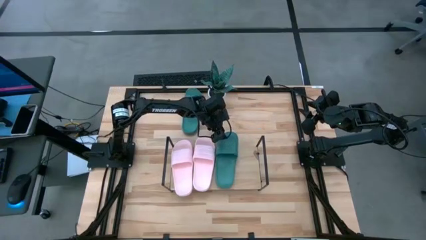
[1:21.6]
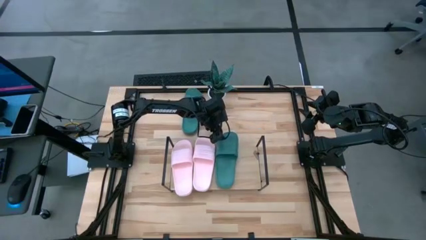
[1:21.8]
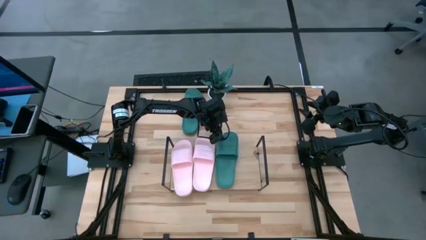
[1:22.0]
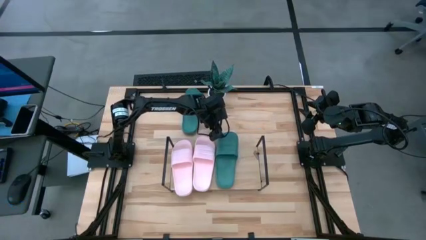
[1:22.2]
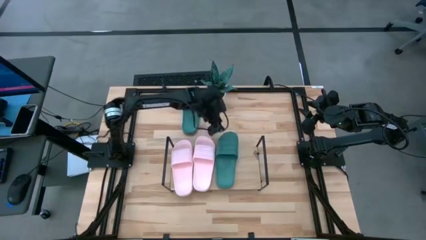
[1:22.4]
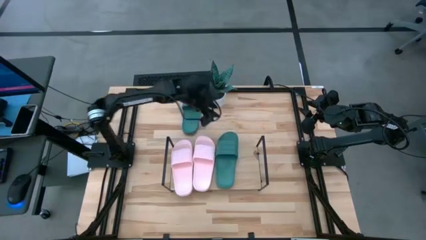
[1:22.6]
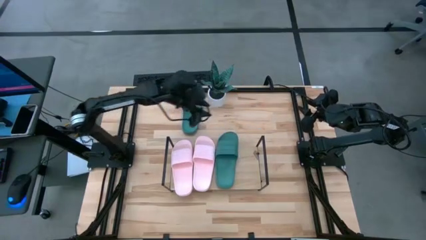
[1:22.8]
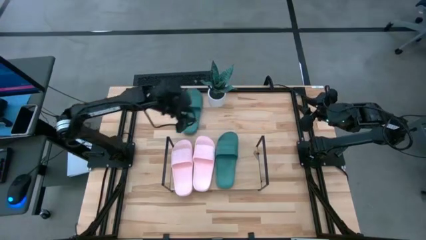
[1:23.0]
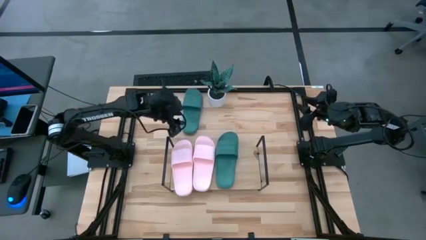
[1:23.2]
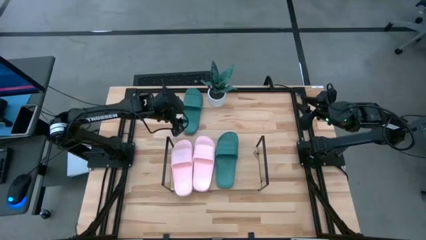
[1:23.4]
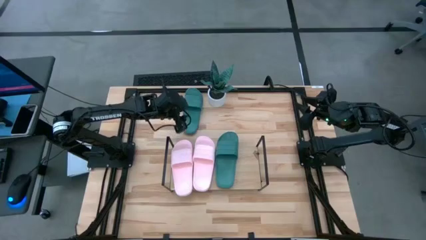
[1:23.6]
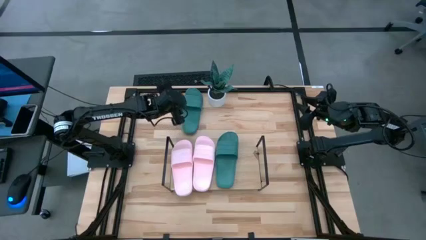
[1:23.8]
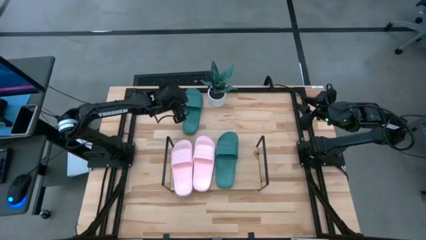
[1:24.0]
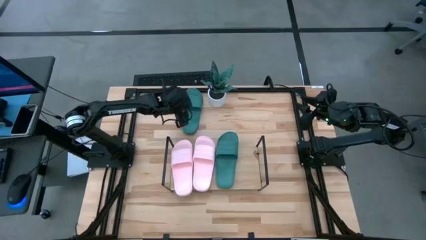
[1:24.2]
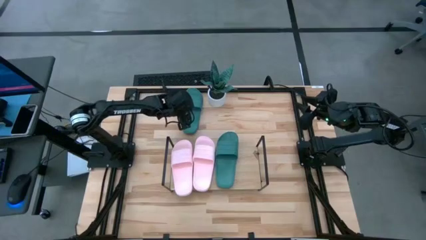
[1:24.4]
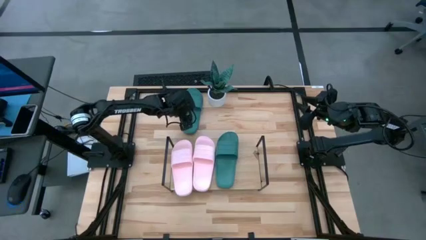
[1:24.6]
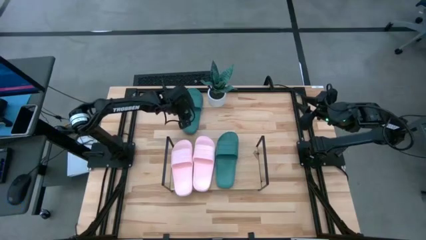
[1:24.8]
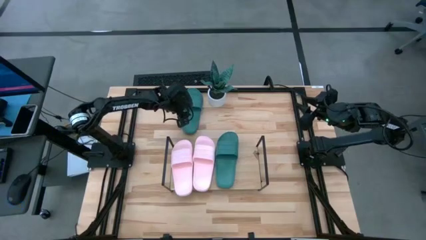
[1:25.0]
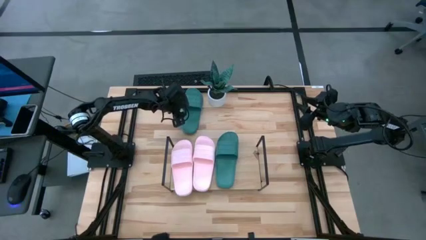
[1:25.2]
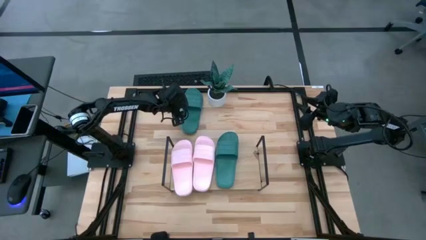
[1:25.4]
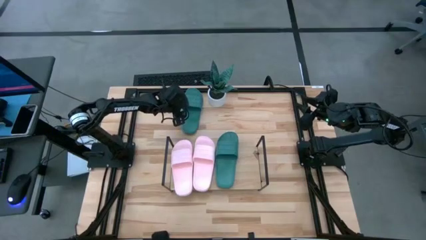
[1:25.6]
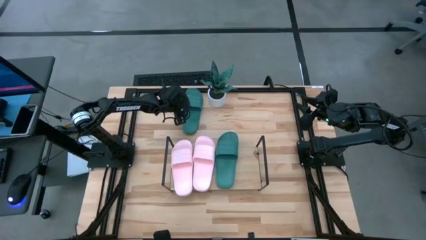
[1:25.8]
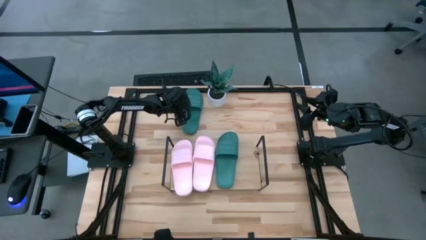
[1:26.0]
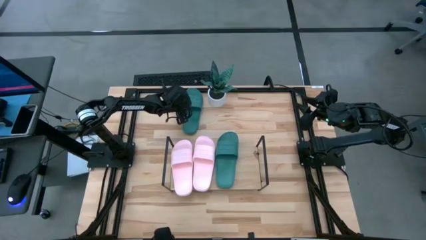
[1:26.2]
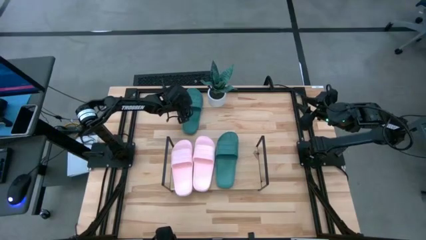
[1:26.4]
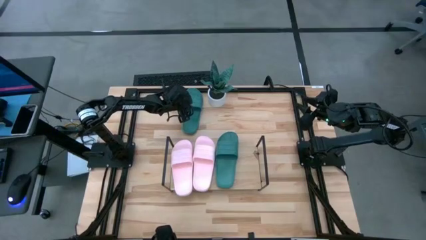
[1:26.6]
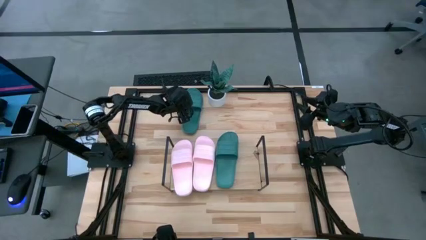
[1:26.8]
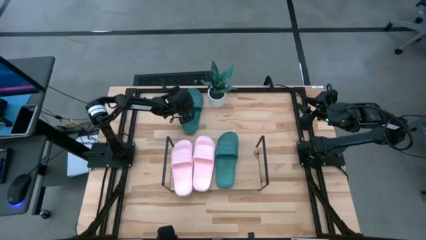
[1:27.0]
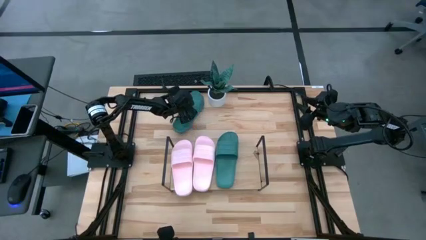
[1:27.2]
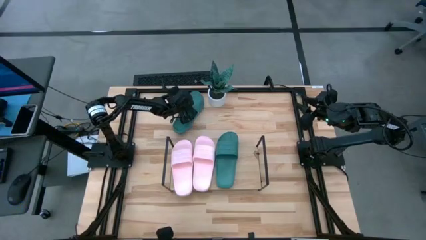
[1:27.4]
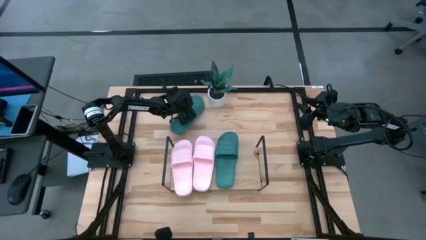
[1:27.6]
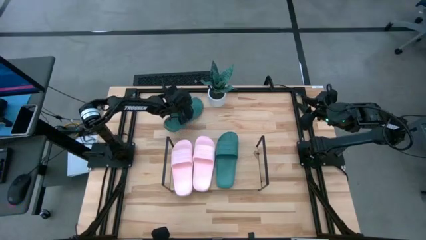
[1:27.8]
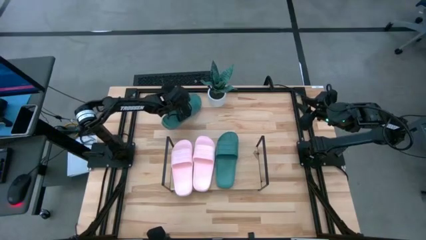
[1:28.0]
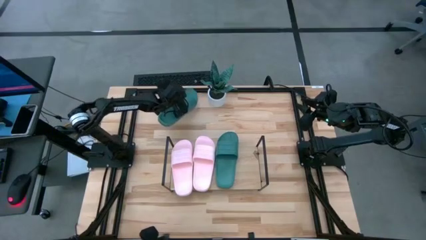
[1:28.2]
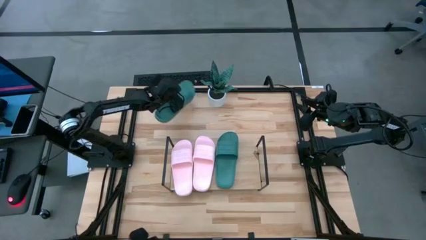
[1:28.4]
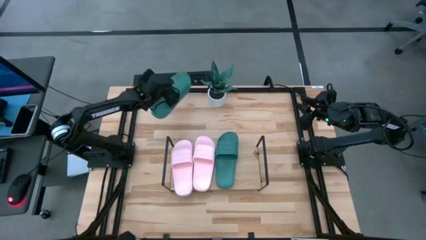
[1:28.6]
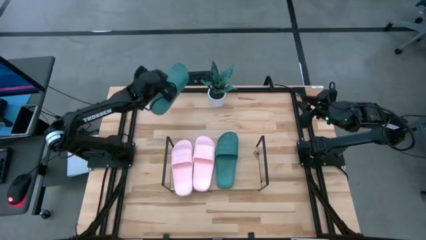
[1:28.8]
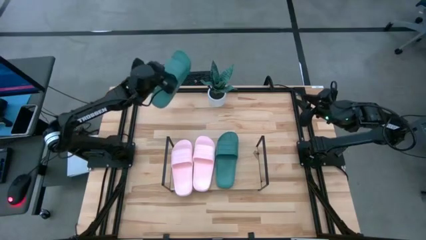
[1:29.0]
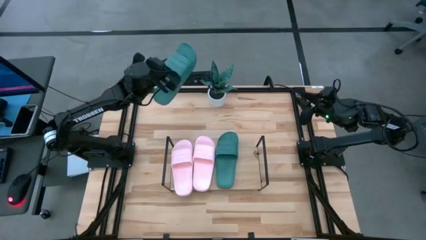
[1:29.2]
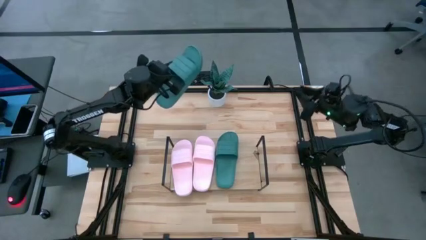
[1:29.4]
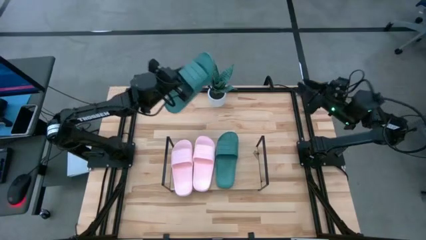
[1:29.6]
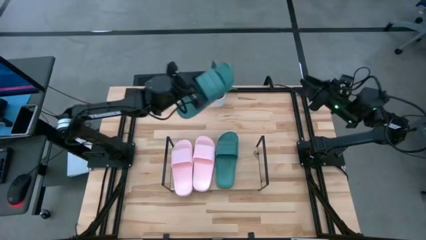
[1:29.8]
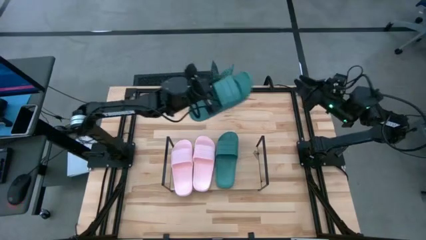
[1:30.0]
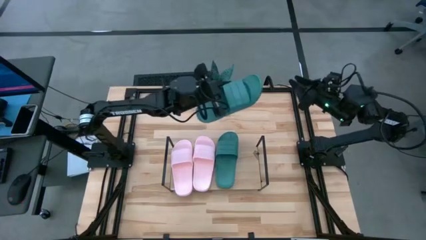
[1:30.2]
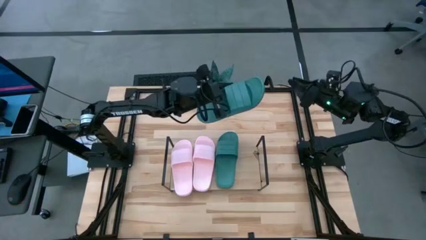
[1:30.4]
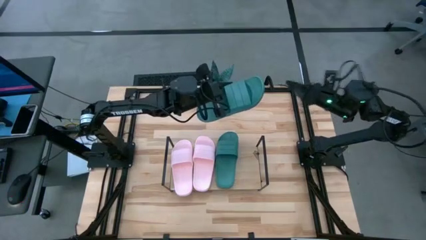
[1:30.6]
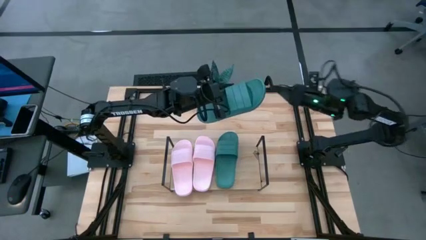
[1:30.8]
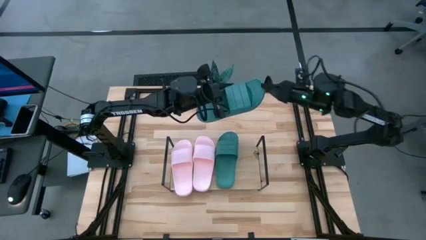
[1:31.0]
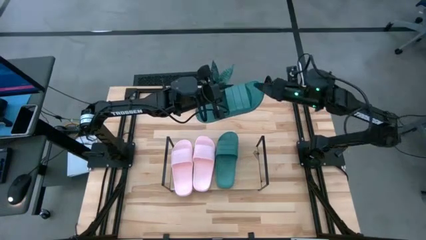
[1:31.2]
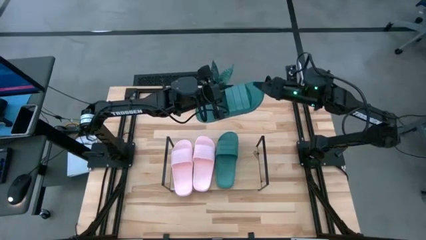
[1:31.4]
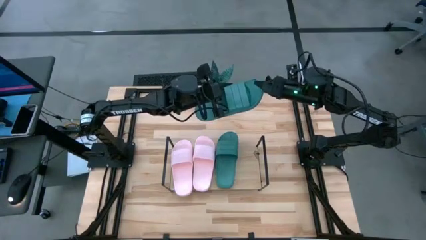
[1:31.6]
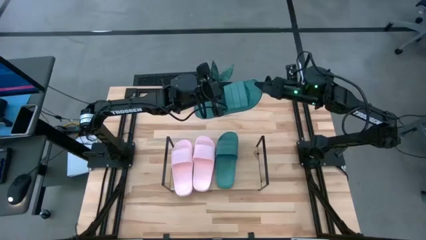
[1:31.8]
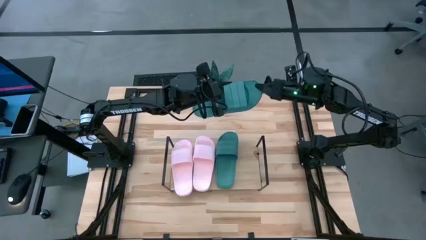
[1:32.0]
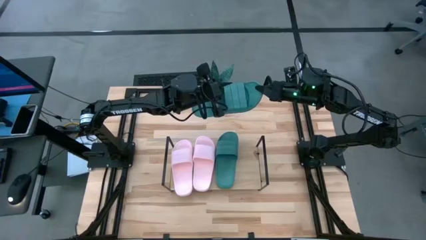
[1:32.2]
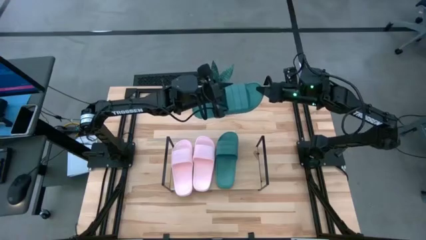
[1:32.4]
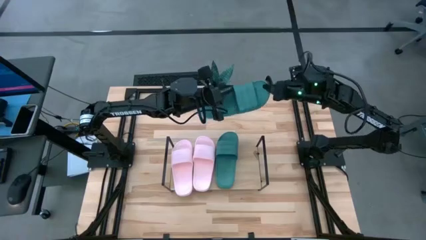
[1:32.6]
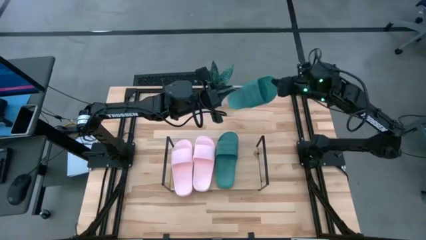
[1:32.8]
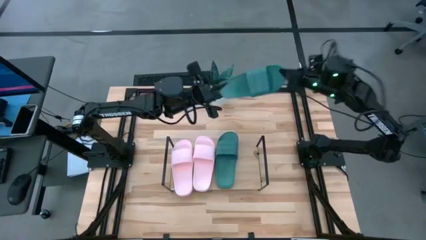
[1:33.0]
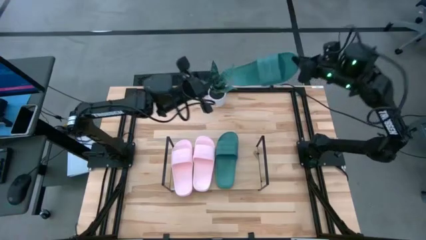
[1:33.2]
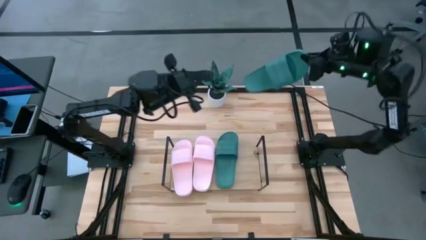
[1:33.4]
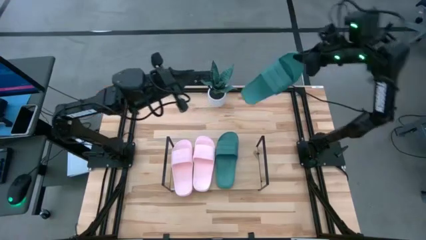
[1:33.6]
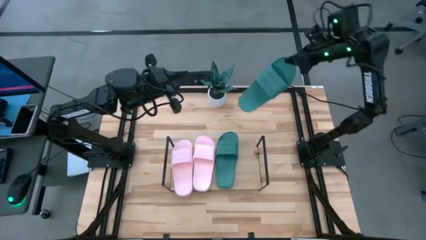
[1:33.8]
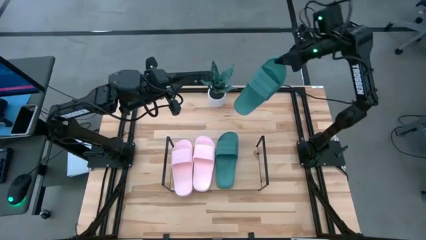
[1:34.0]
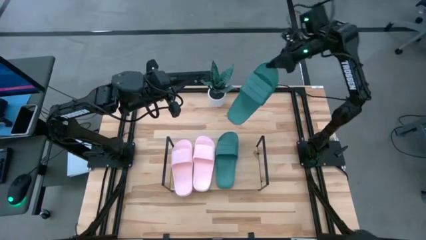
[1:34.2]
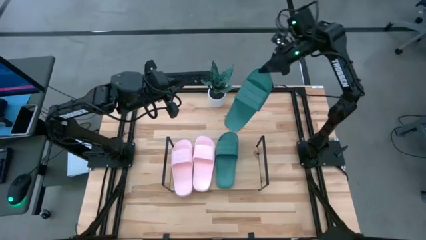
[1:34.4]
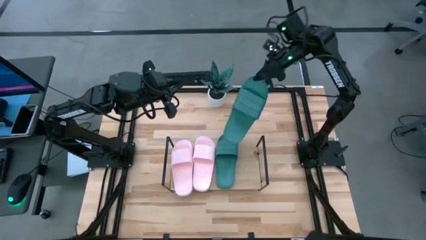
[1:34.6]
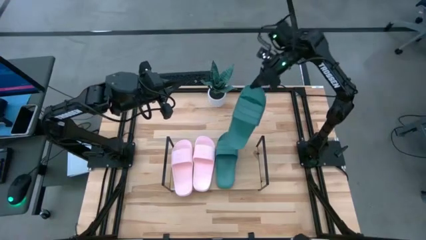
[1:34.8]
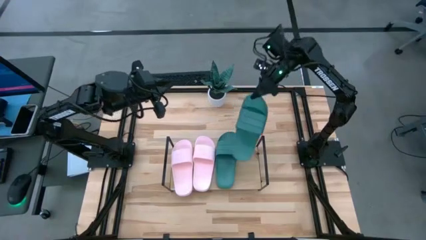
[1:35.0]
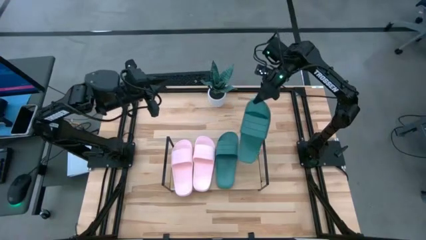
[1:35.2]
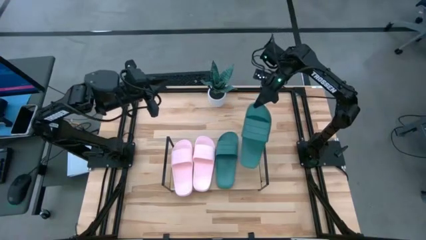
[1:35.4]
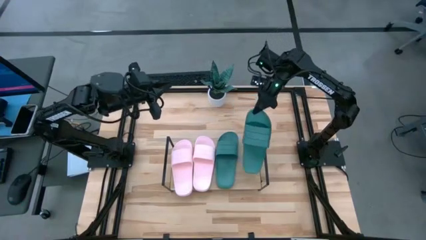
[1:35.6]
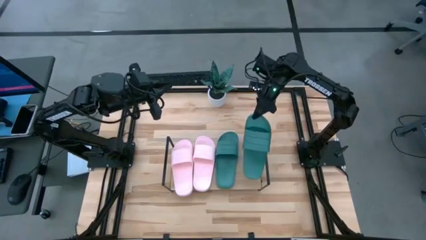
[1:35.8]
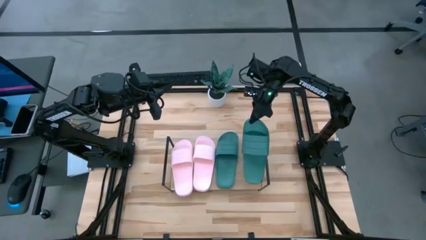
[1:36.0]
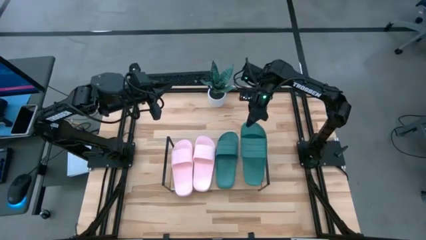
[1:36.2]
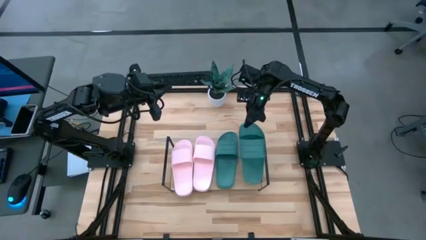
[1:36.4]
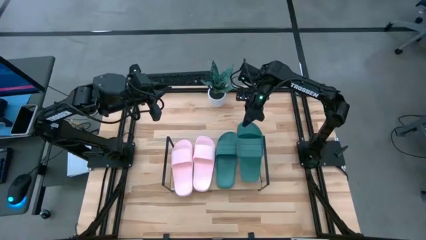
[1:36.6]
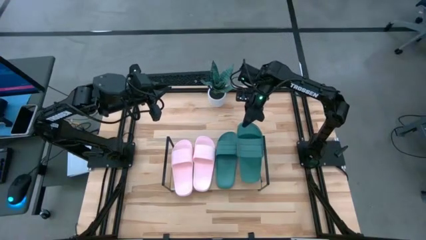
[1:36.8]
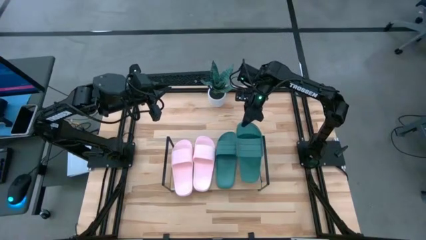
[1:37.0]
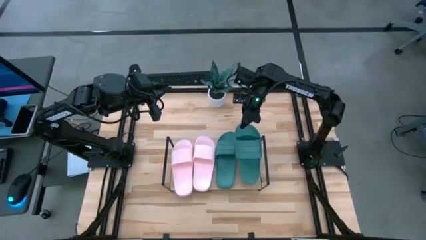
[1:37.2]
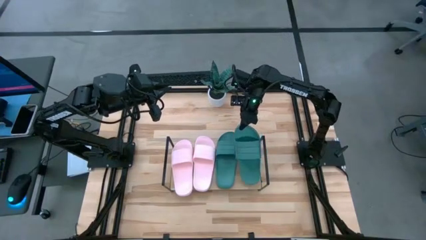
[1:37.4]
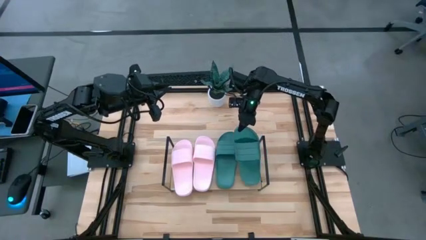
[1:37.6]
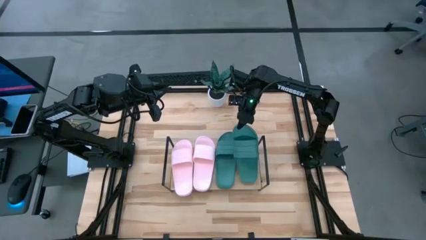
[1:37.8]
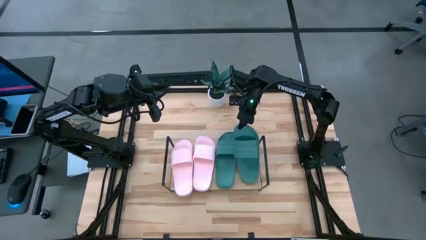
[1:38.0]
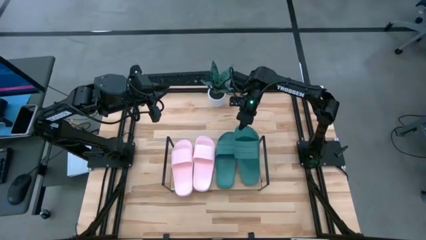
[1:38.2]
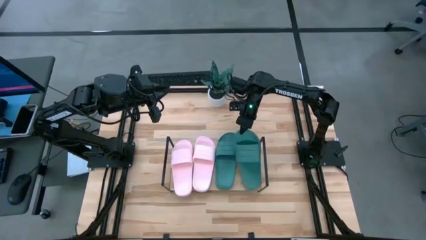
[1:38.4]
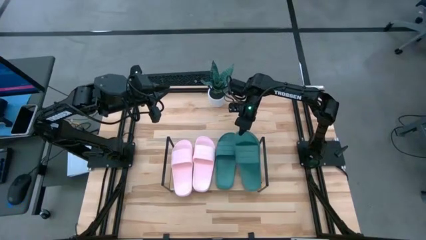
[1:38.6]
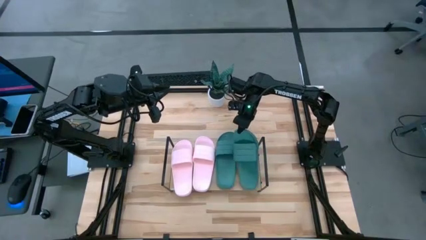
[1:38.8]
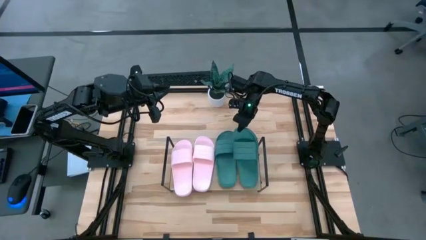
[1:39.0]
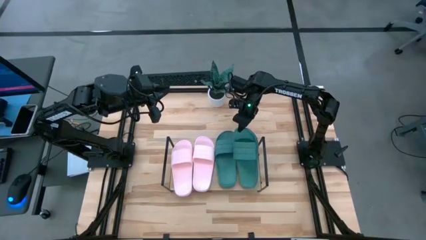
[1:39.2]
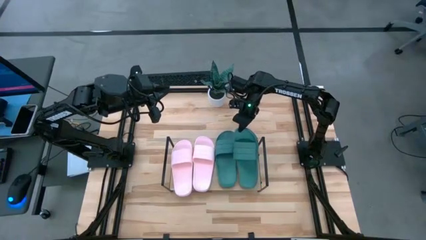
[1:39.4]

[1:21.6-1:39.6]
Task: Pick and place slides into the shelf
Put the green slide on the shelf
